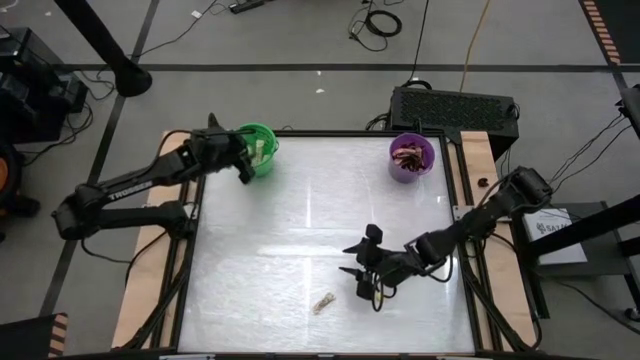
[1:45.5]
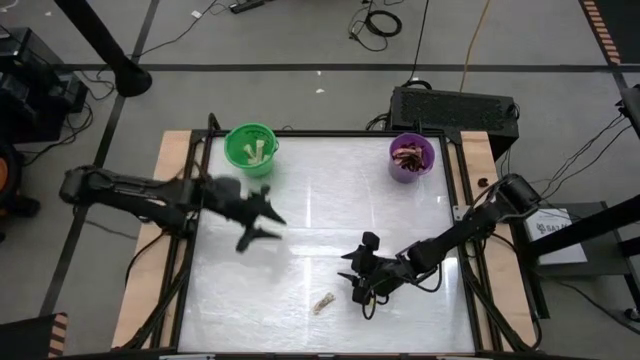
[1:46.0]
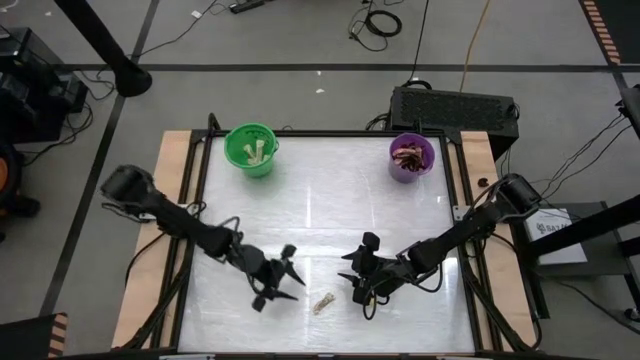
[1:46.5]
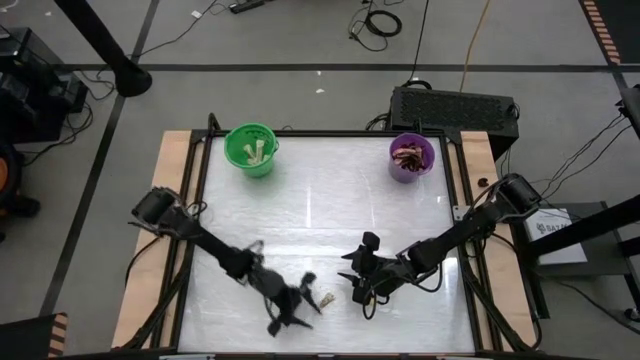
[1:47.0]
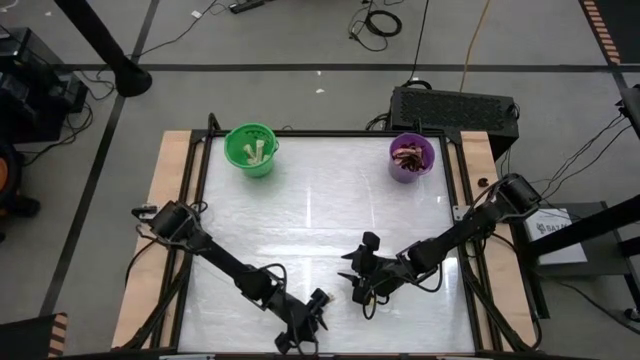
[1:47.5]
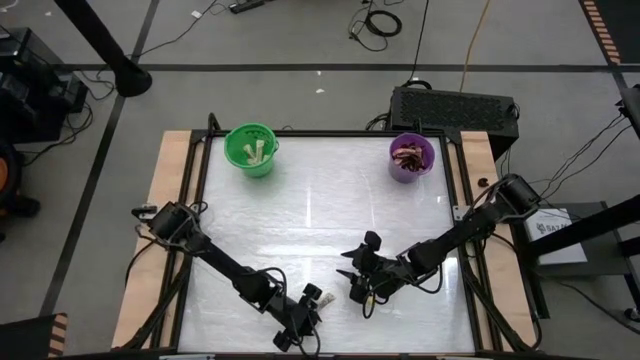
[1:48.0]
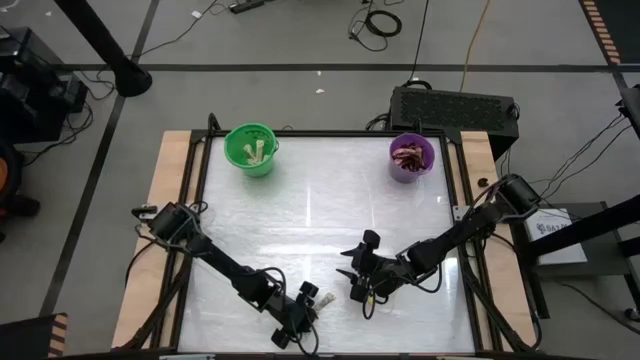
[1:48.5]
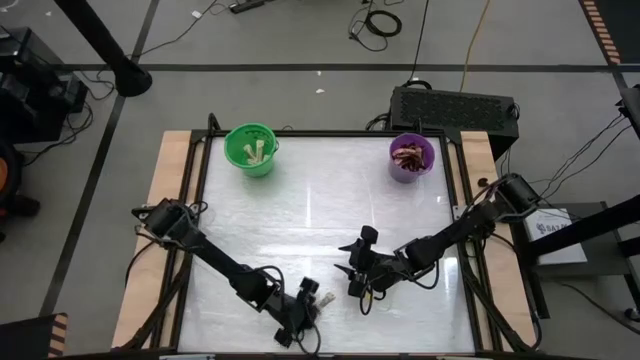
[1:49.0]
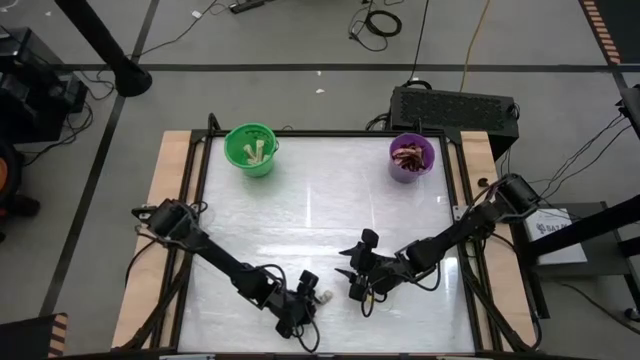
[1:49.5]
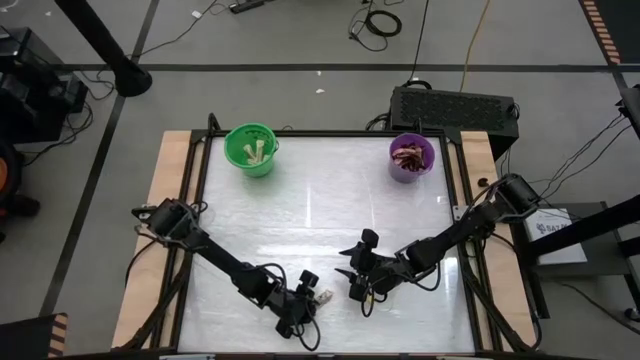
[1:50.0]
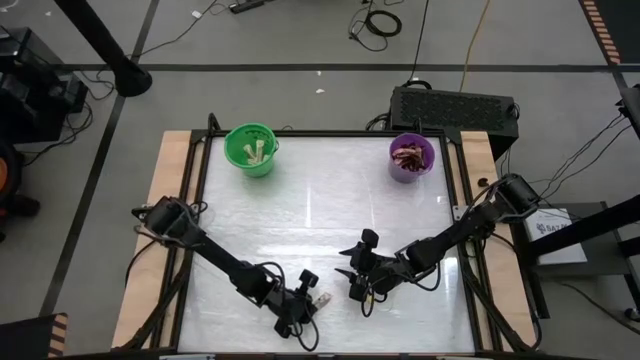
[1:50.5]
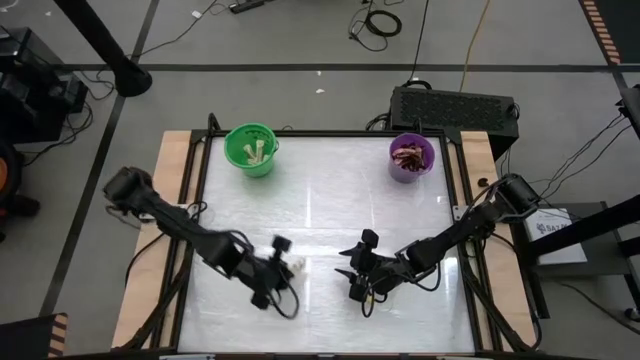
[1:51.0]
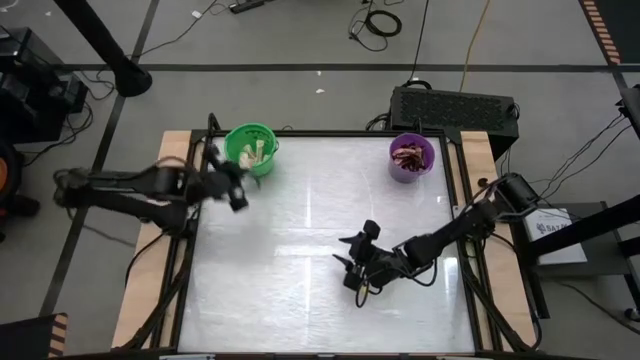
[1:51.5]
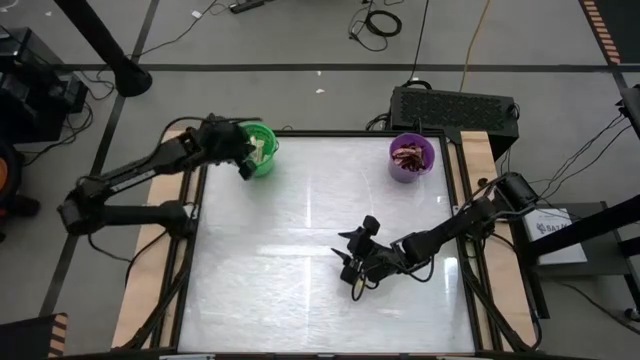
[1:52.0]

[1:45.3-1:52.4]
Task: Sort candy by brand, put in halloween buckets
Put the white chocolate bar into the green bucket

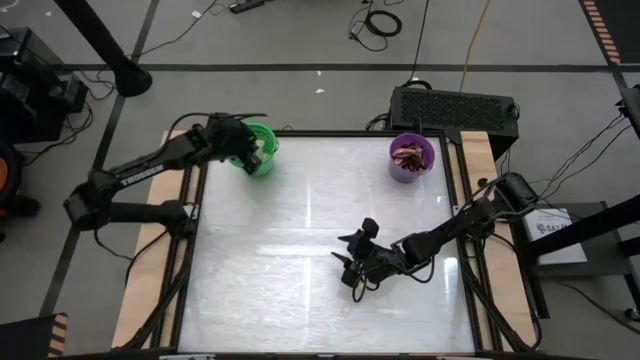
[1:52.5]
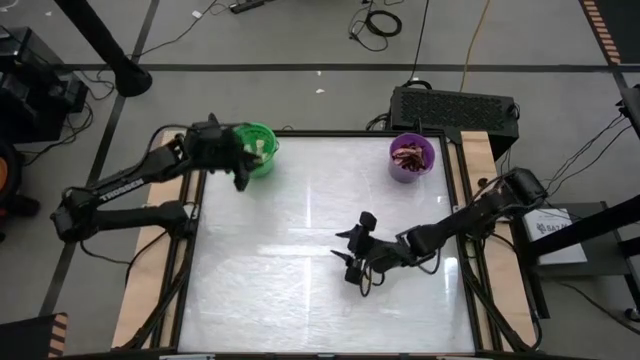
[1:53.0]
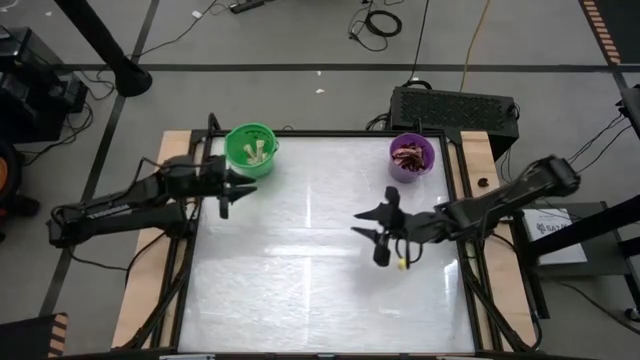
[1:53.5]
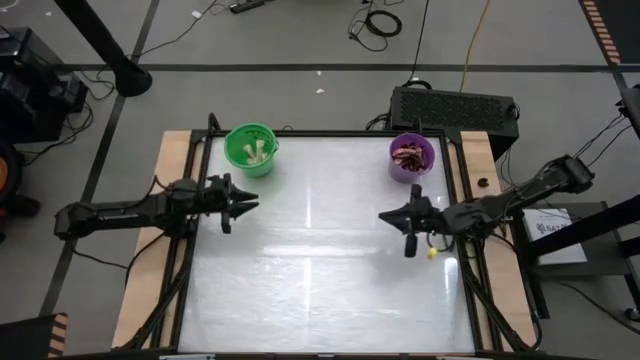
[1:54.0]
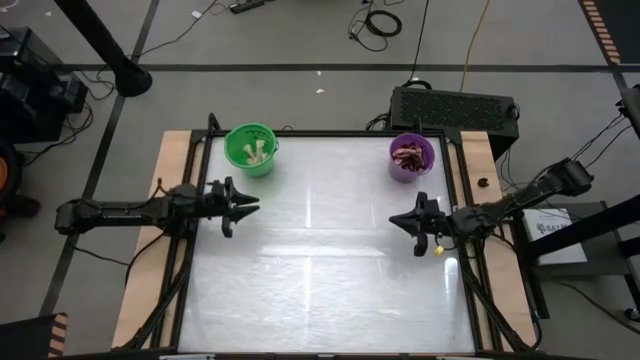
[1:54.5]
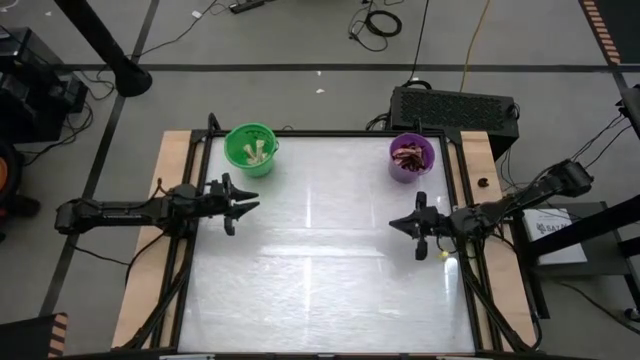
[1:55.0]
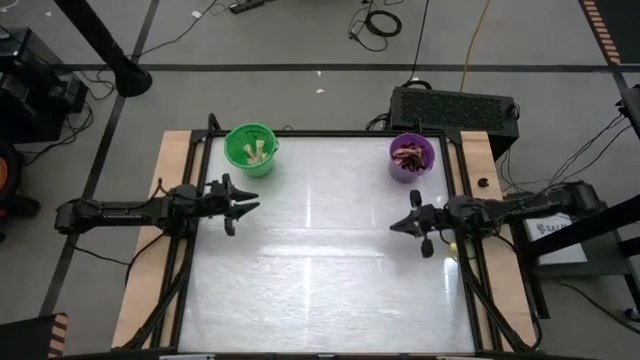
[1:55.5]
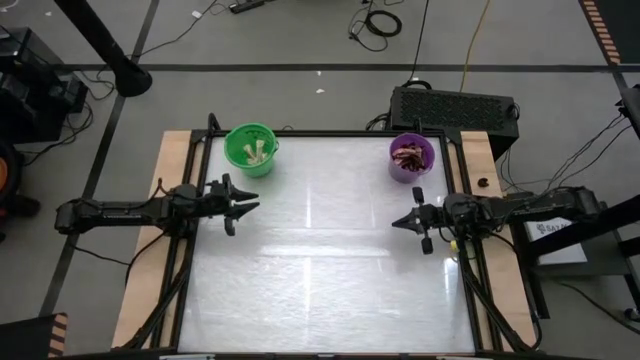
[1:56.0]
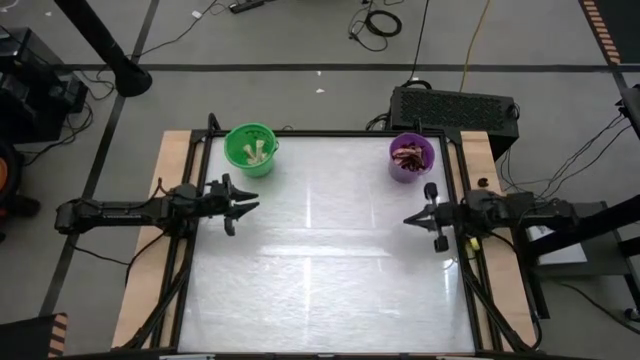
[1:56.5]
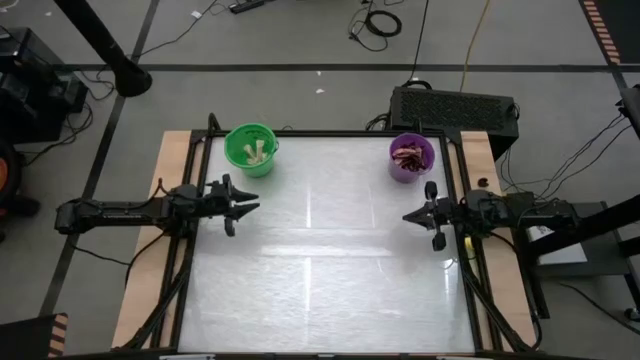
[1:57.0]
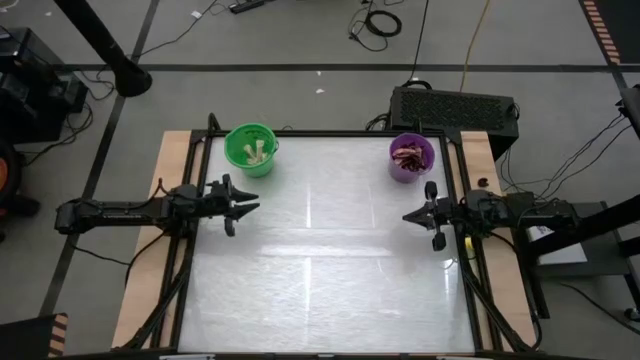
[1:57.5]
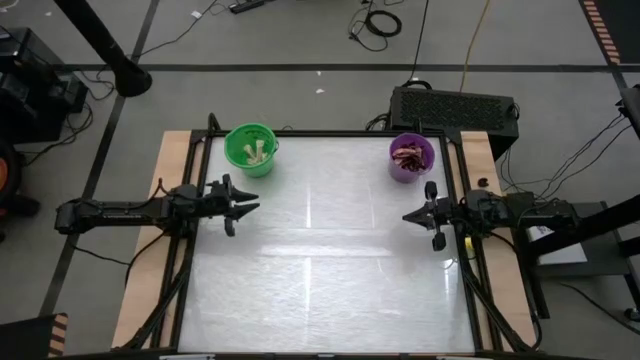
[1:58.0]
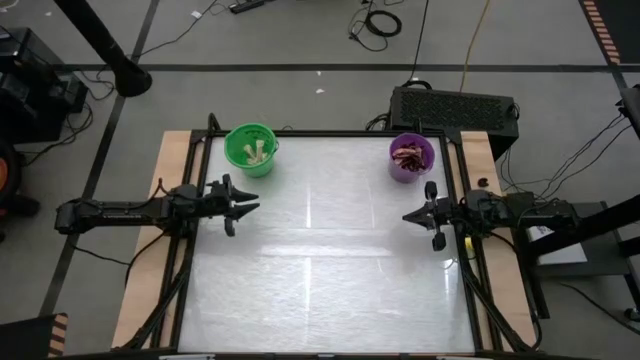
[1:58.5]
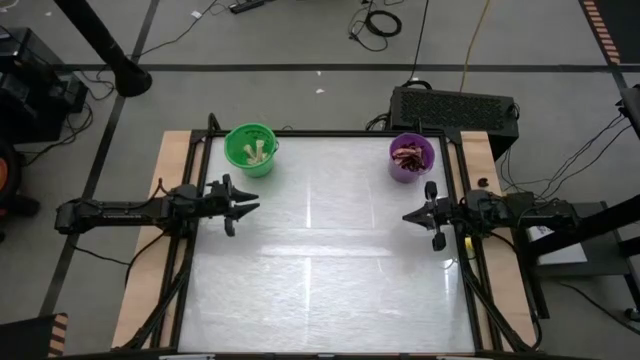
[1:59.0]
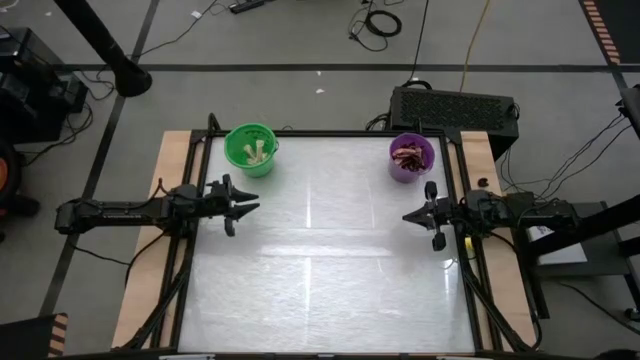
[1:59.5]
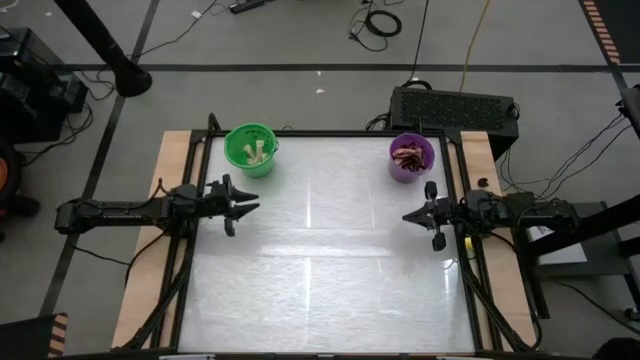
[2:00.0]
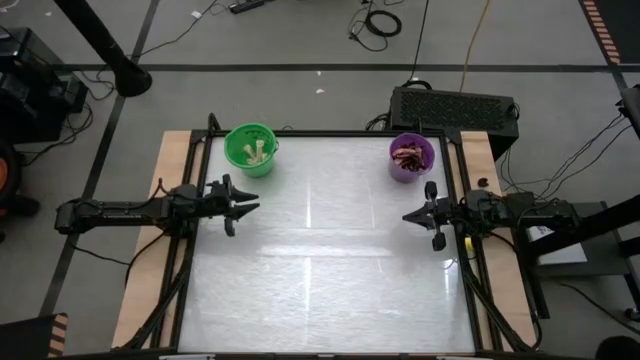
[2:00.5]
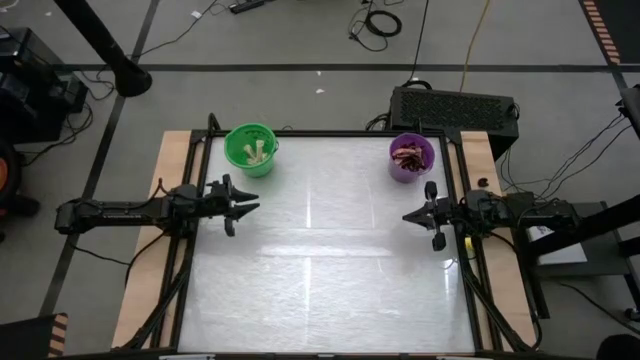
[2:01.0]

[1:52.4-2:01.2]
Return to Home Position

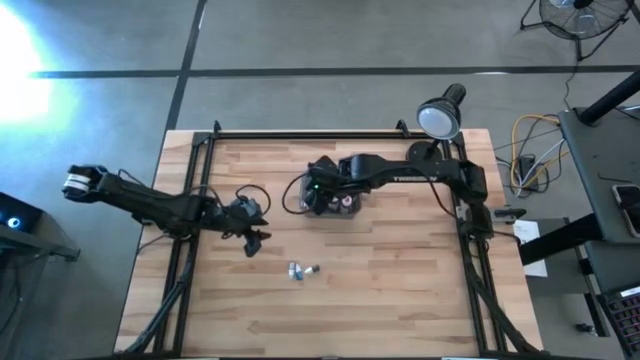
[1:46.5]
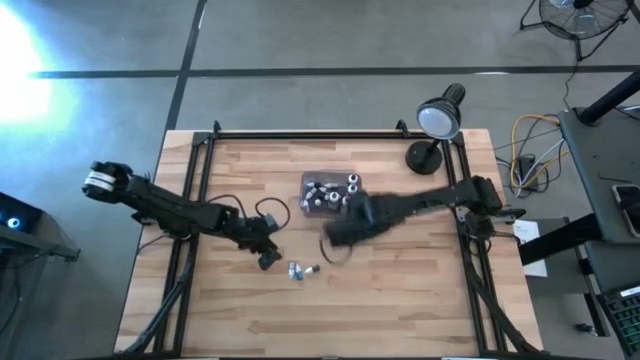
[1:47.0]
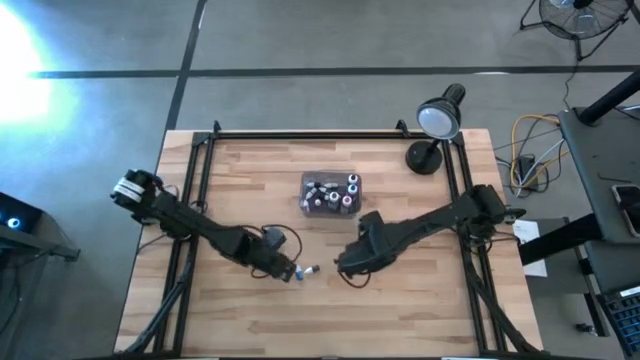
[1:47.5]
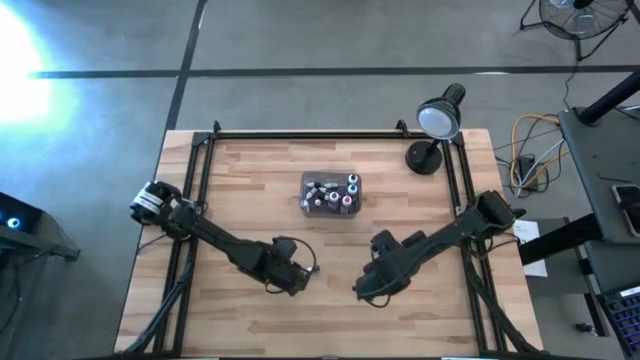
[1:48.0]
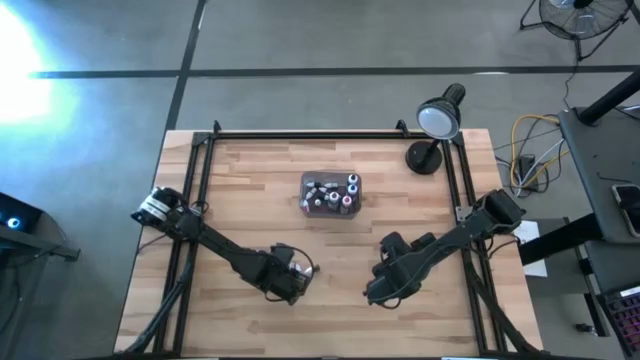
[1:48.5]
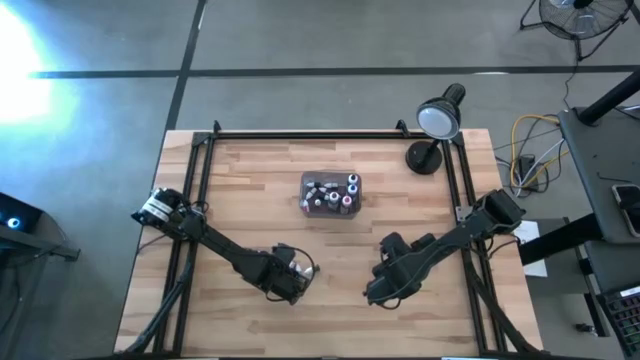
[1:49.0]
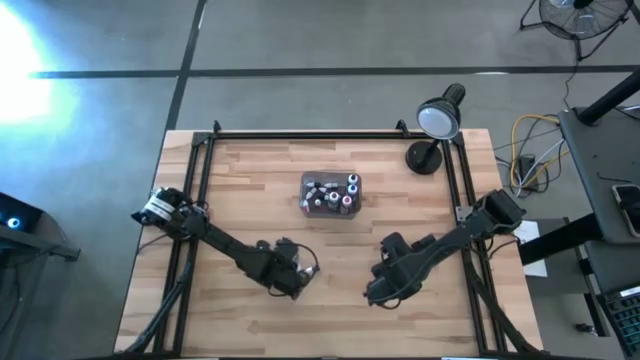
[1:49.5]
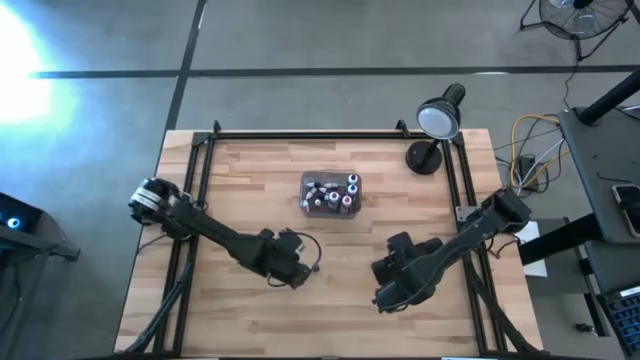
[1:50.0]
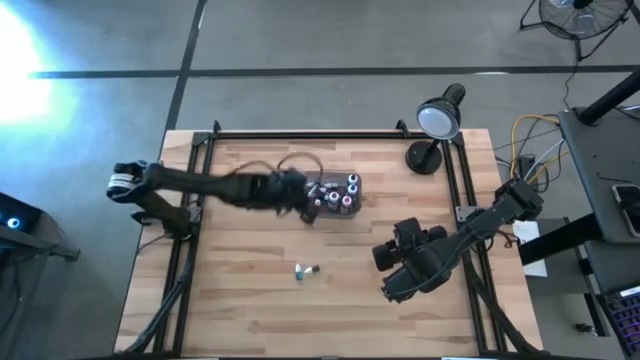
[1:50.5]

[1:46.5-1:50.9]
Task: Pick & Place food coloring
Put the small violet food coloring bottle into the bin

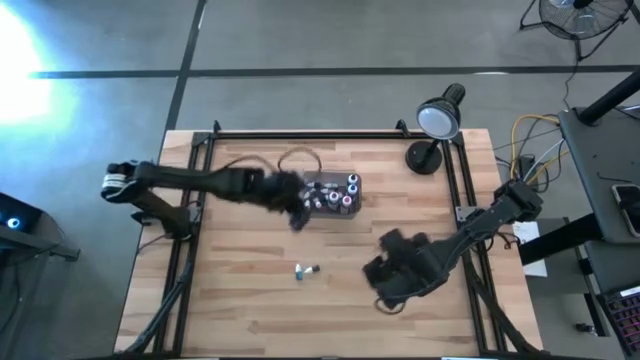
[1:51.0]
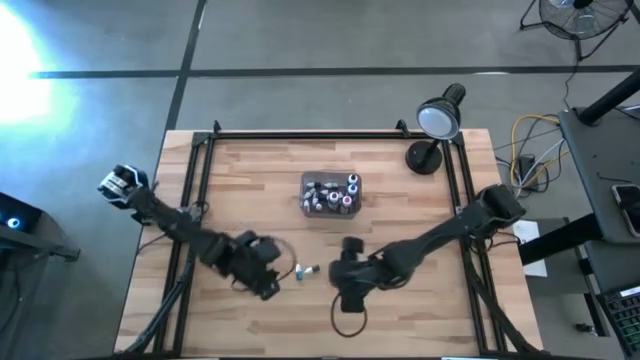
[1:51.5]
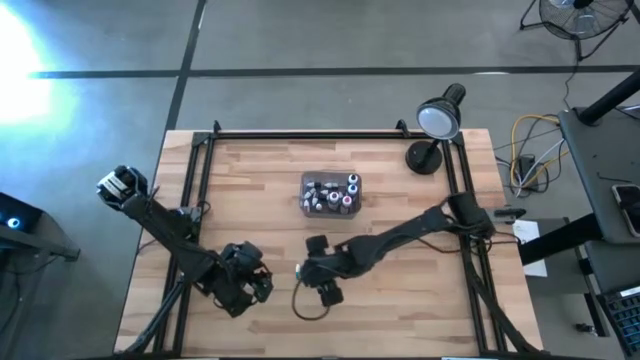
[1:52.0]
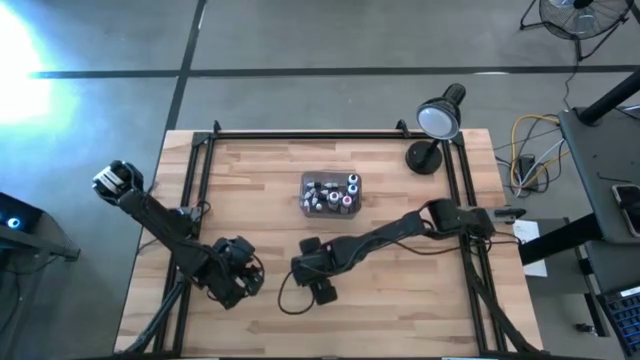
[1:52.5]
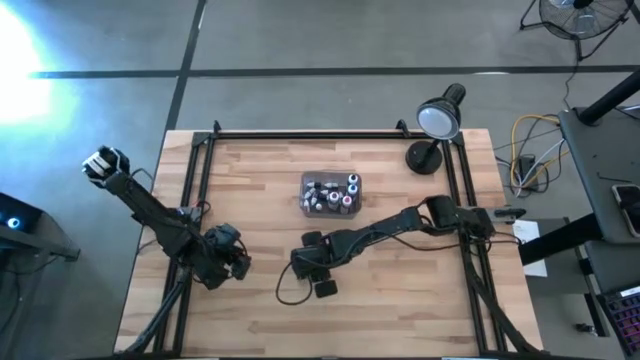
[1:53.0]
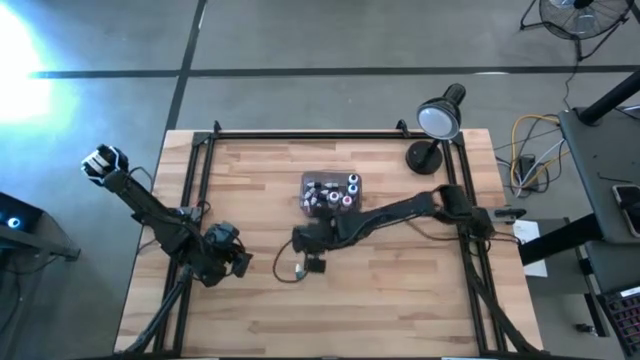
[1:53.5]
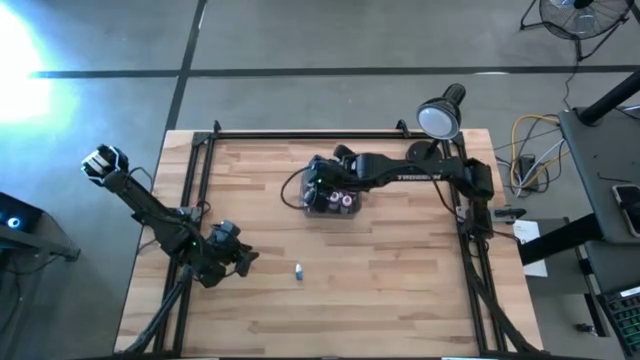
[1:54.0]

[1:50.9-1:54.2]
Put the small brown food coloring bottle into the bin
